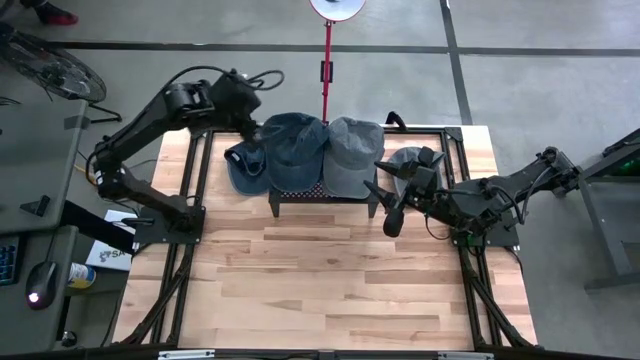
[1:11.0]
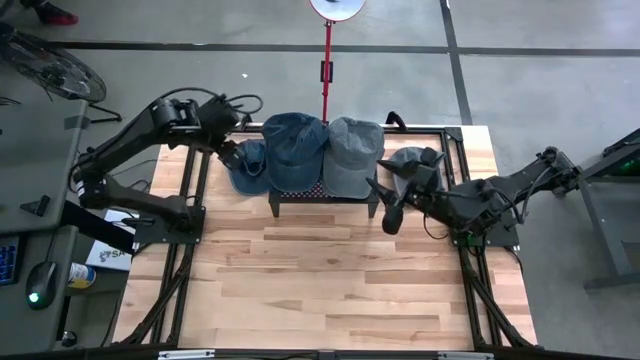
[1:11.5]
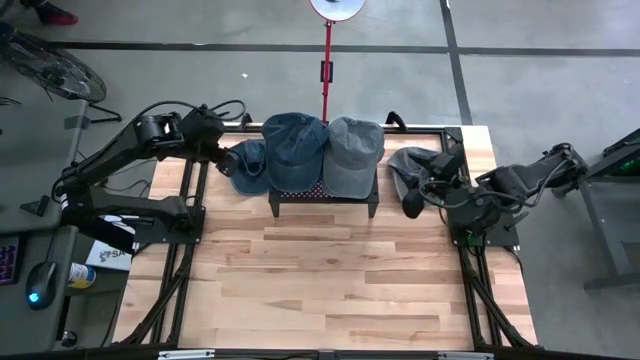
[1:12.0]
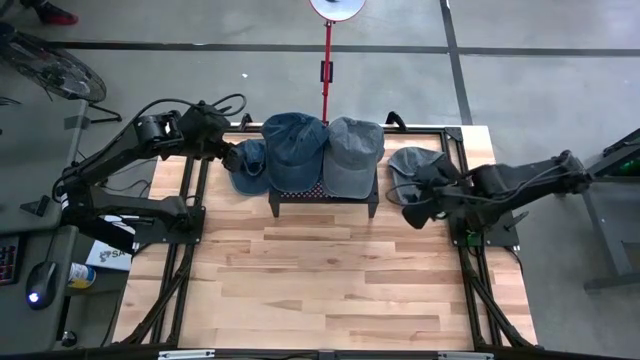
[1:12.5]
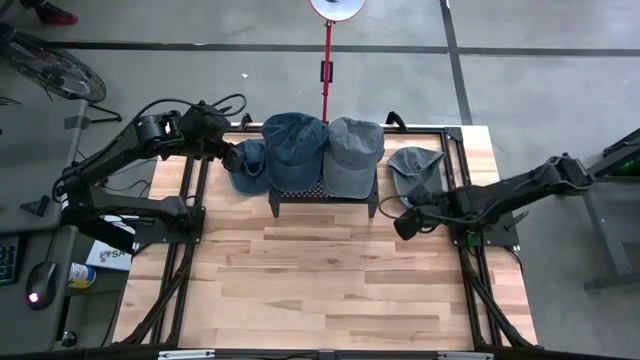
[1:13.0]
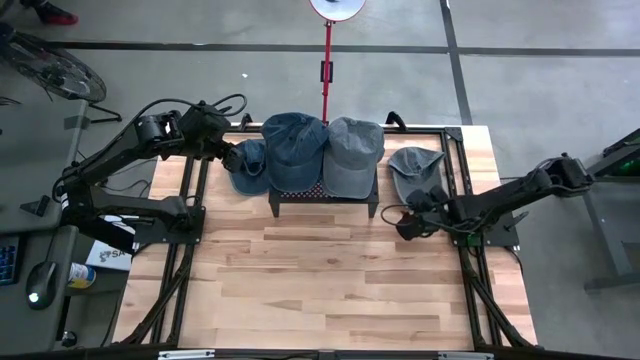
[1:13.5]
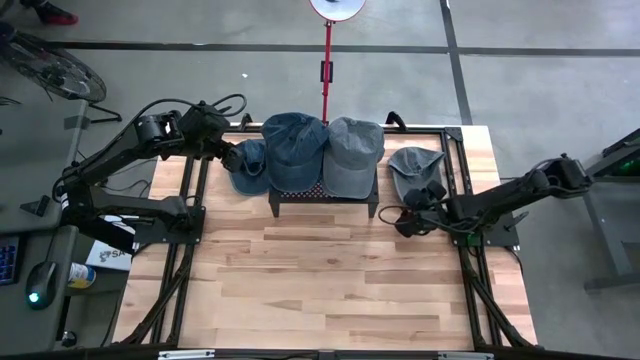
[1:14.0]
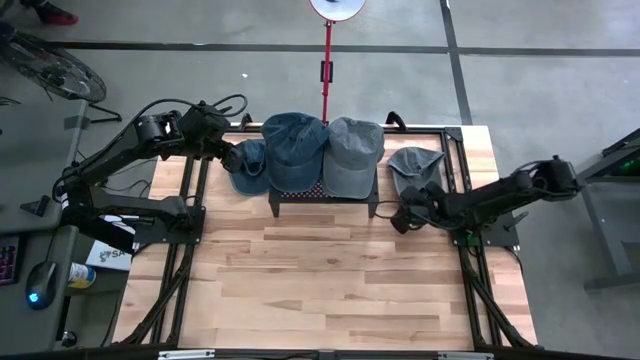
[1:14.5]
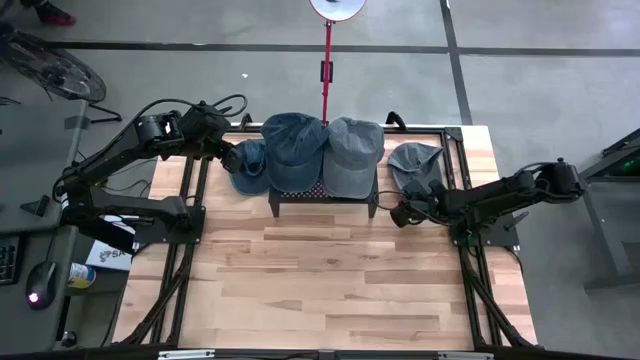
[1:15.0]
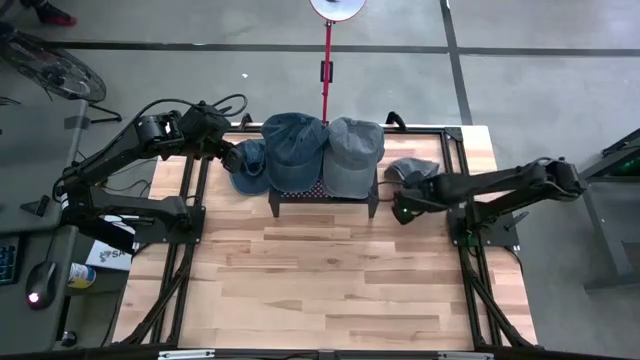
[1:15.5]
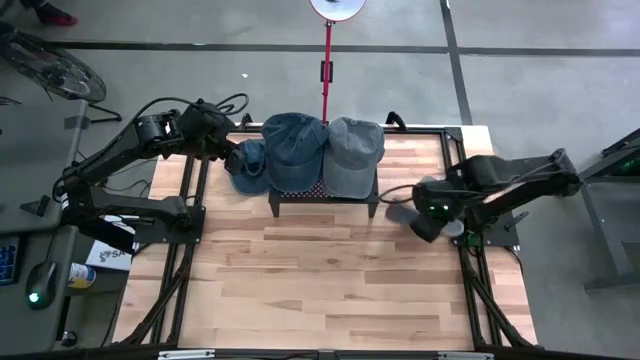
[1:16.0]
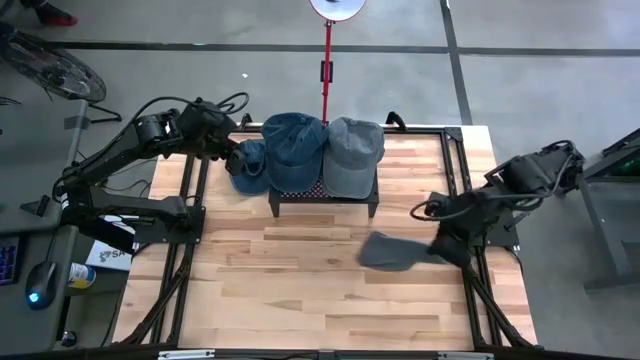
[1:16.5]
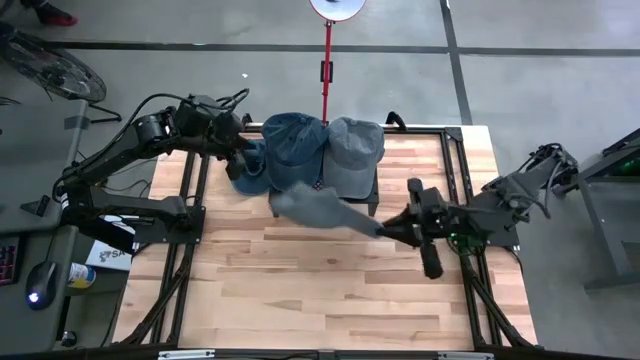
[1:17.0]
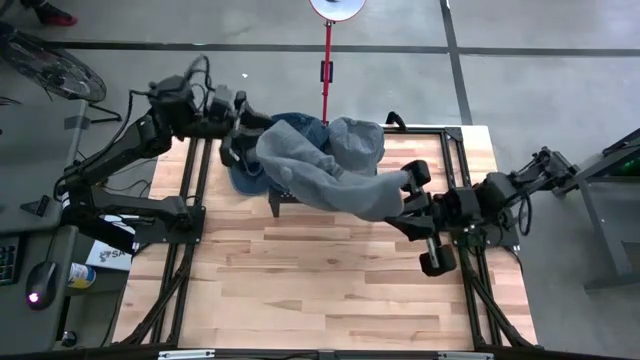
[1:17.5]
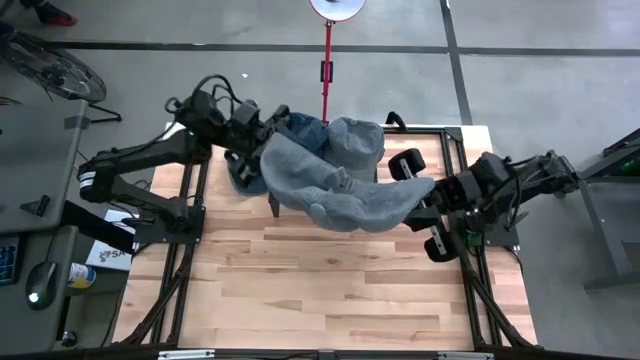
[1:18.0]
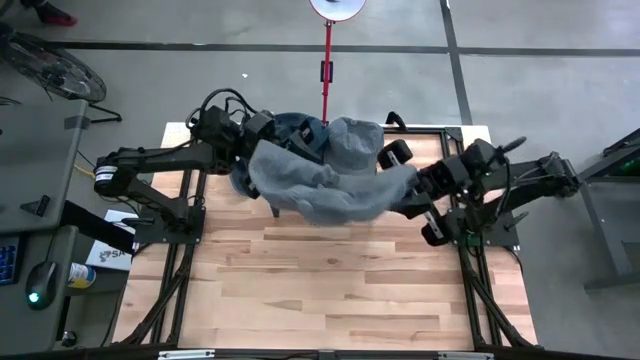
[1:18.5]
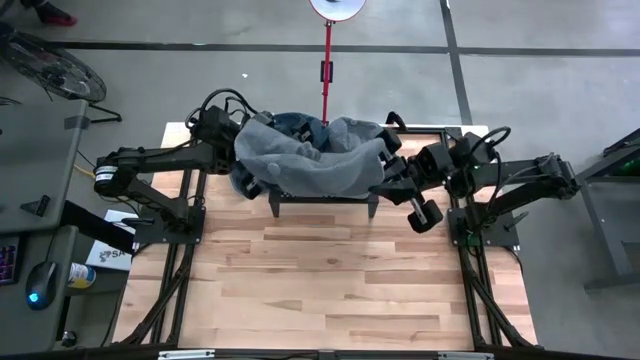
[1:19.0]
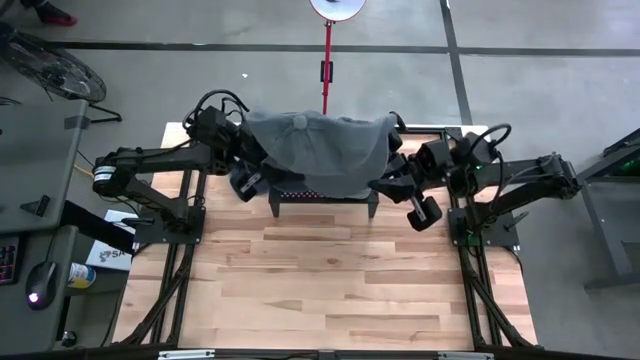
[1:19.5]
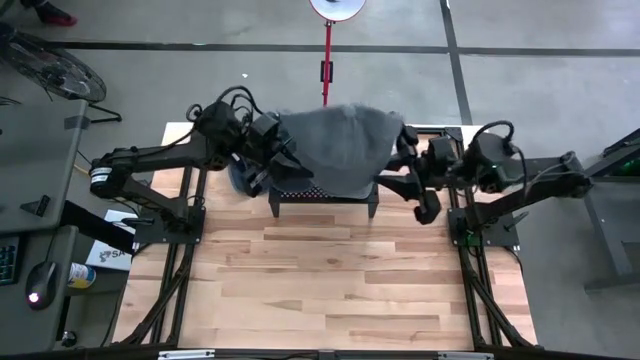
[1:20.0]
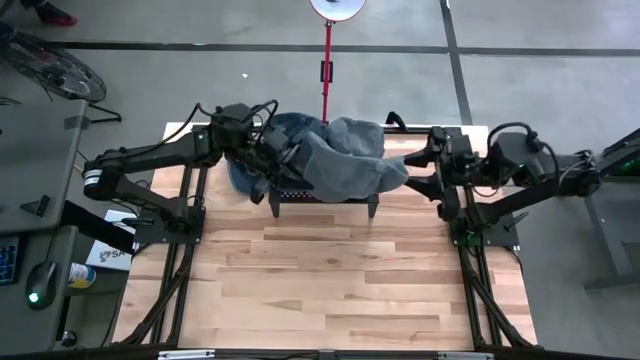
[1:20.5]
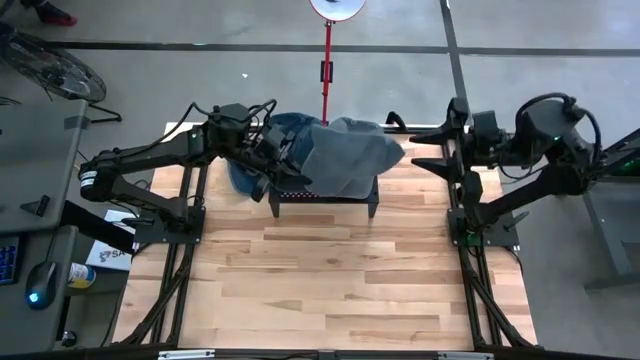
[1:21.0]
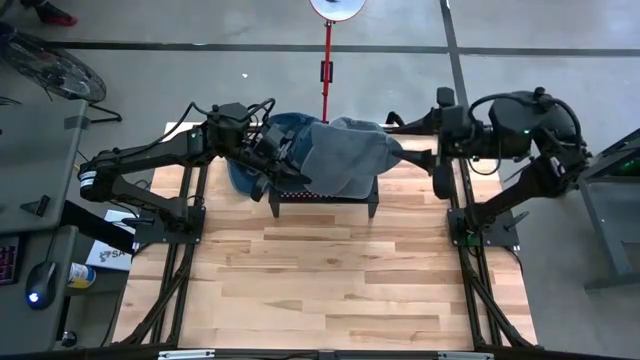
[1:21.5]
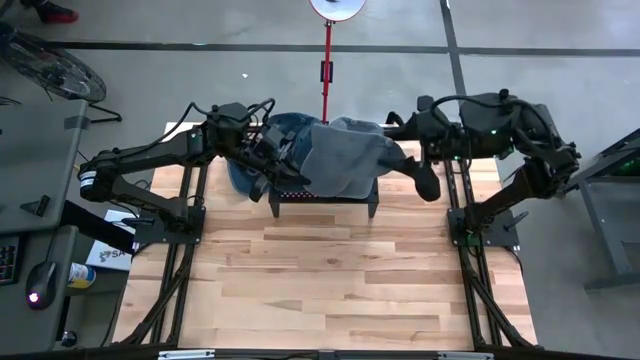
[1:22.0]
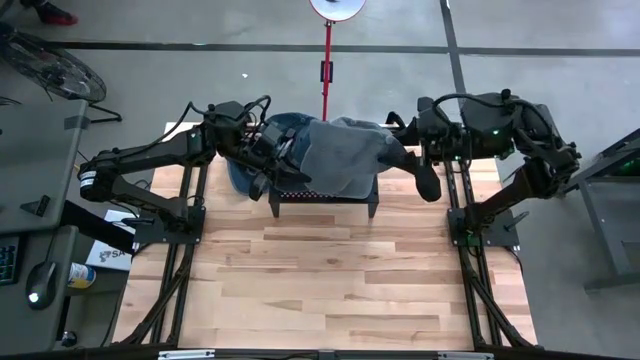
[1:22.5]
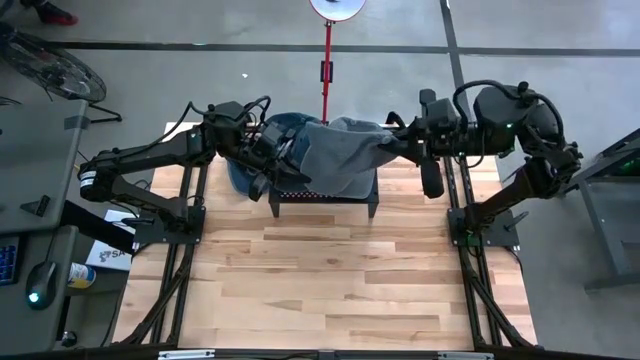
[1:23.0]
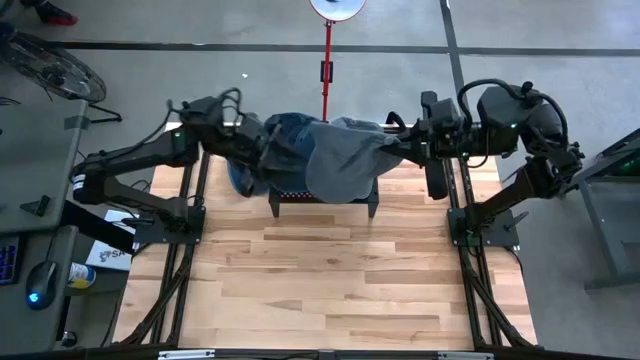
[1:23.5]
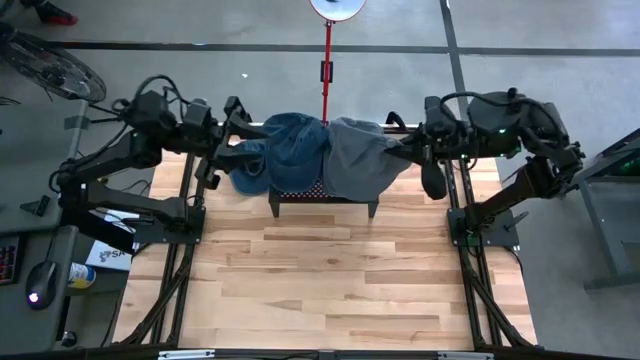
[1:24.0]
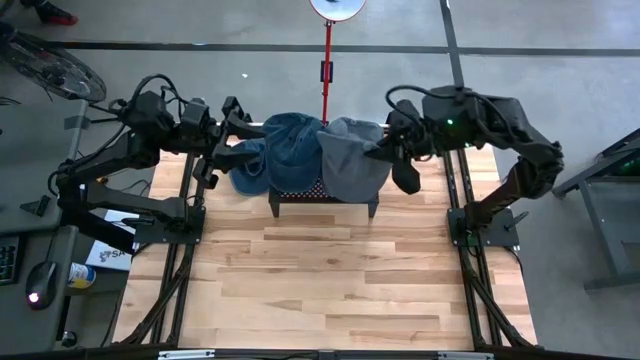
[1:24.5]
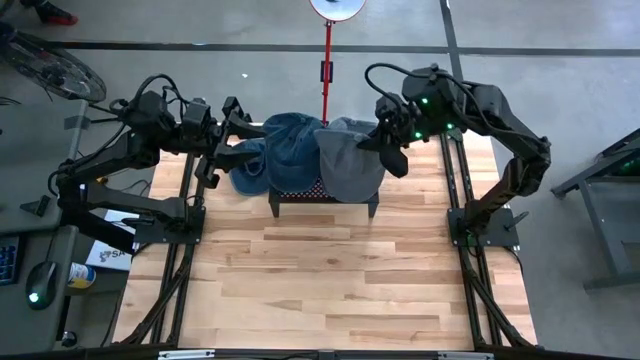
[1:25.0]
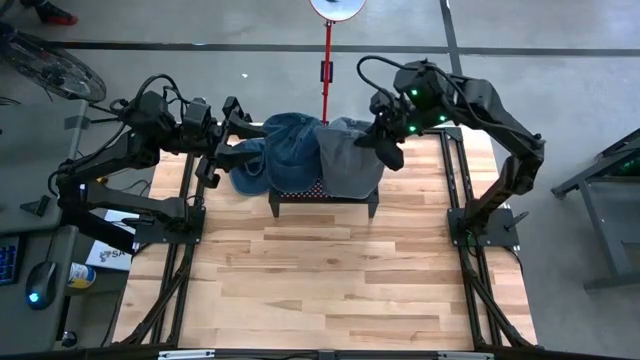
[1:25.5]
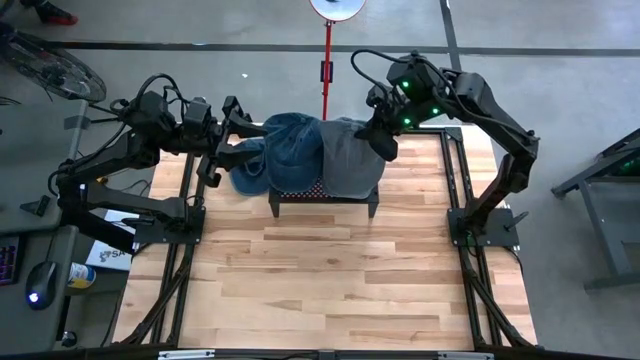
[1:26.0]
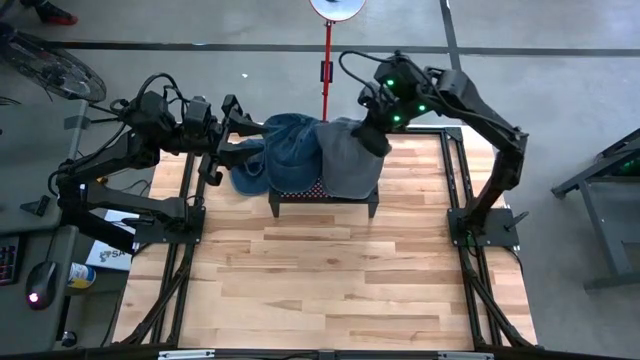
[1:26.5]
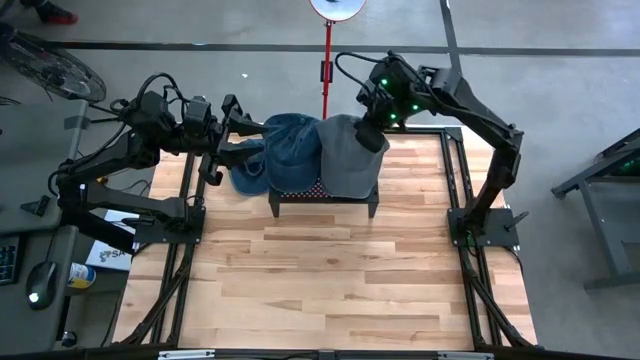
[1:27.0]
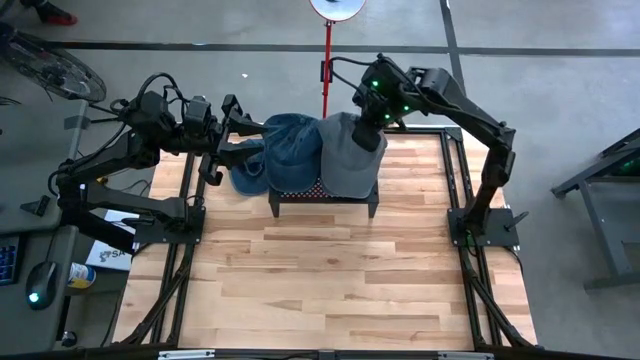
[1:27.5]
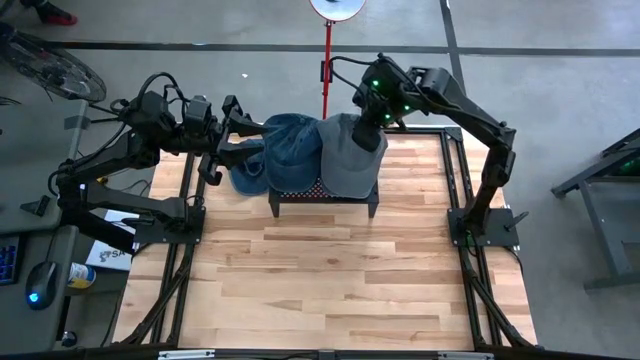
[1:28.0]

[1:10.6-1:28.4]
Task: Pick & Place hat
Stack the gray cap on the gray cap
